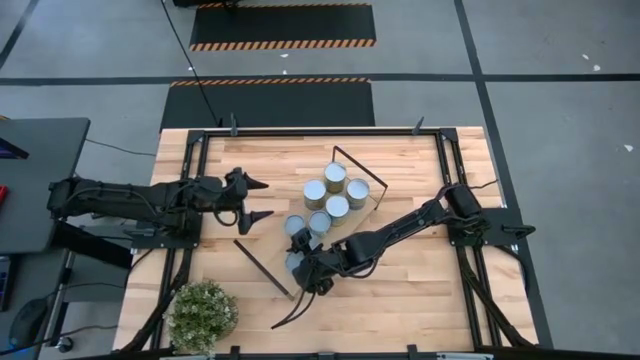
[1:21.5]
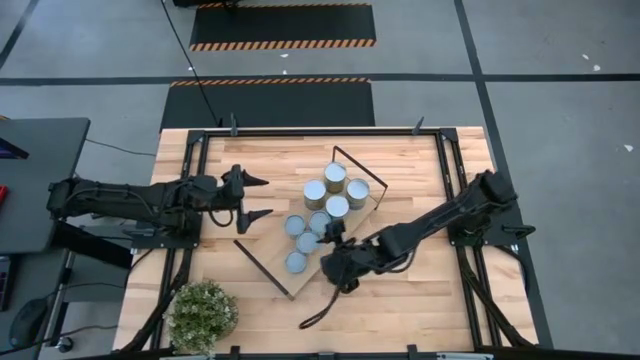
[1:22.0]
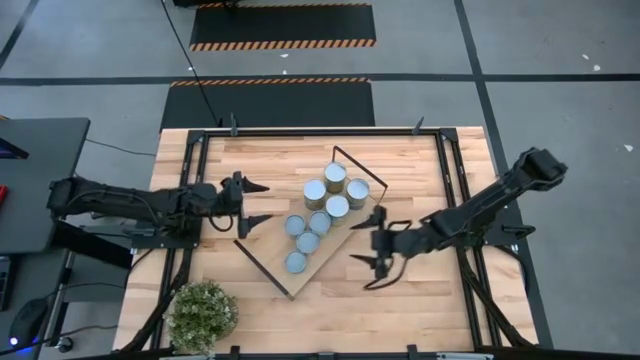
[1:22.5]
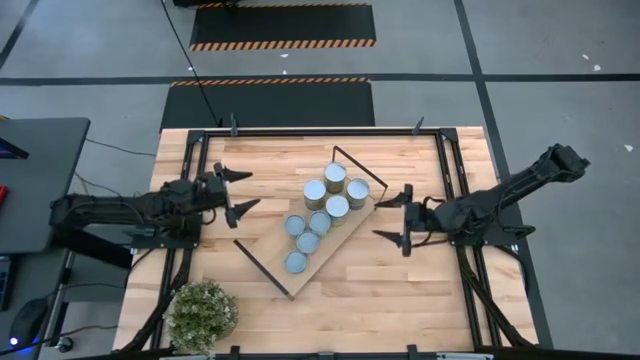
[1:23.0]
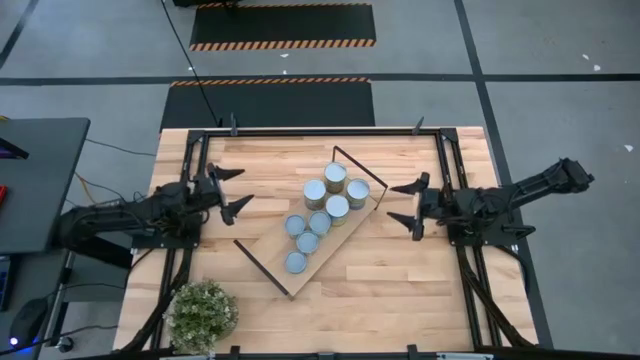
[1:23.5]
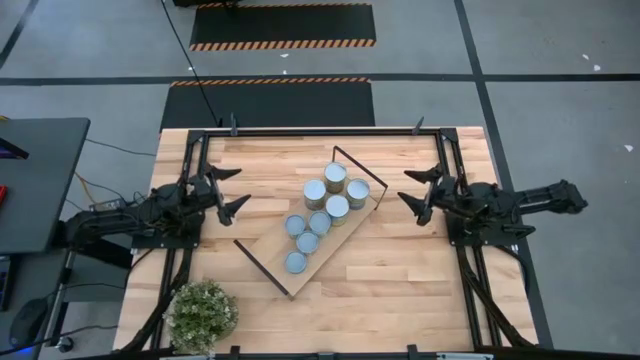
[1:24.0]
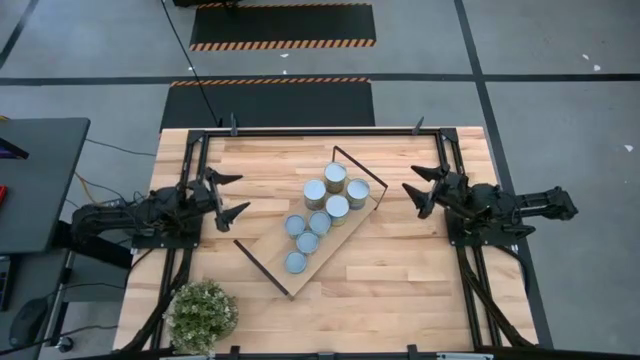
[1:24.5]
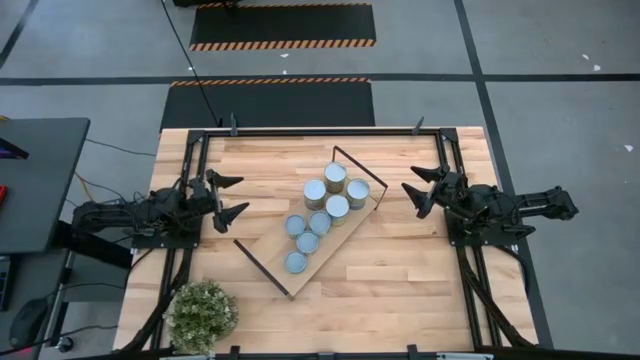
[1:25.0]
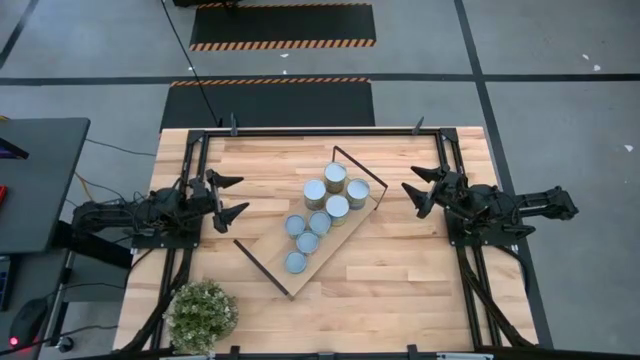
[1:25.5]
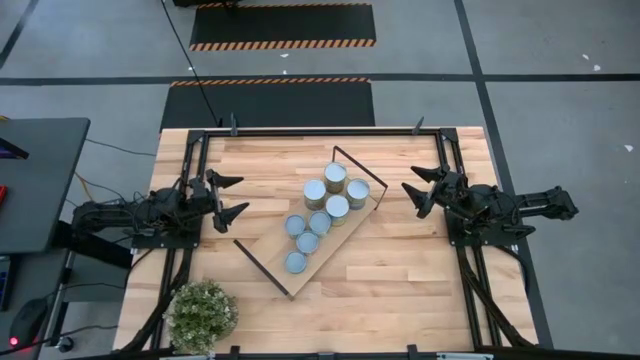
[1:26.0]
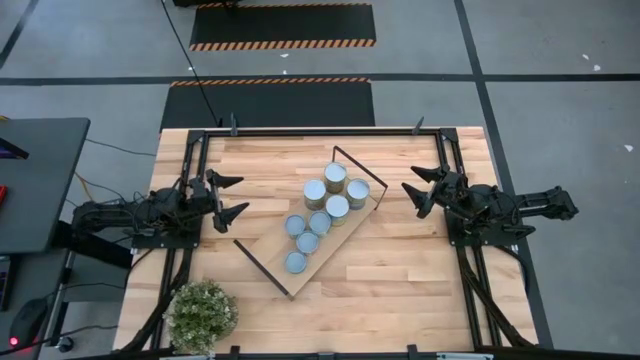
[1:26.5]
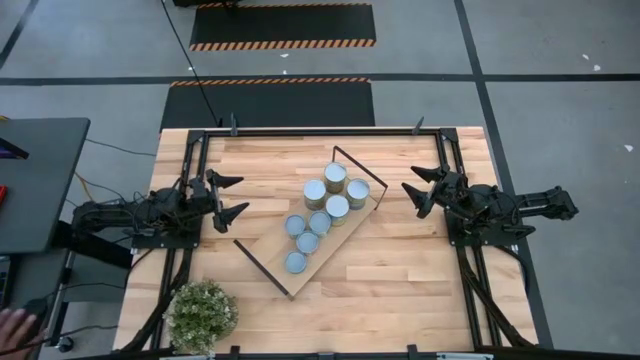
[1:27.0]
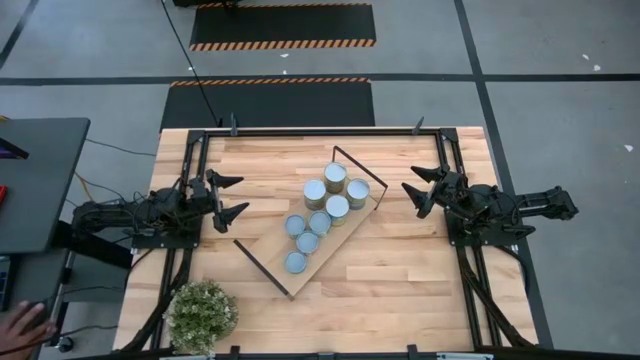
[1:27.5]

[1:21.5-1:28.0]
Task: Pick and place cans onto a shelf
Return to Home Position

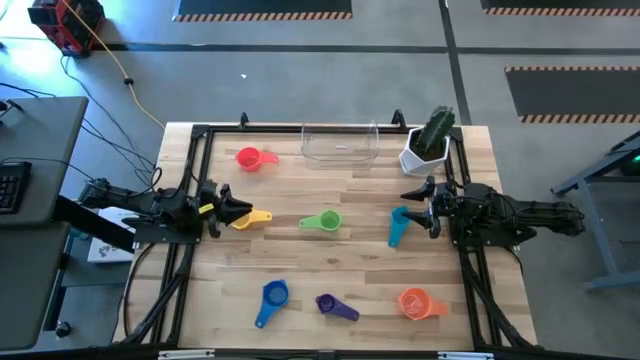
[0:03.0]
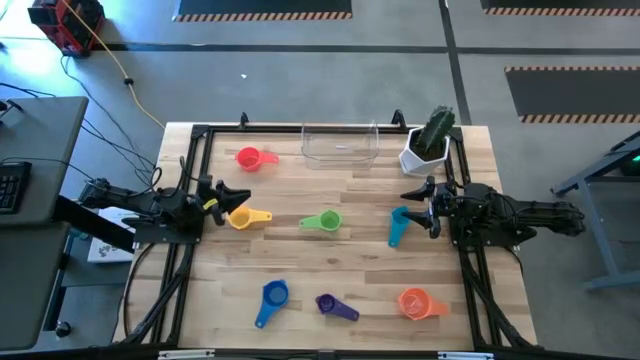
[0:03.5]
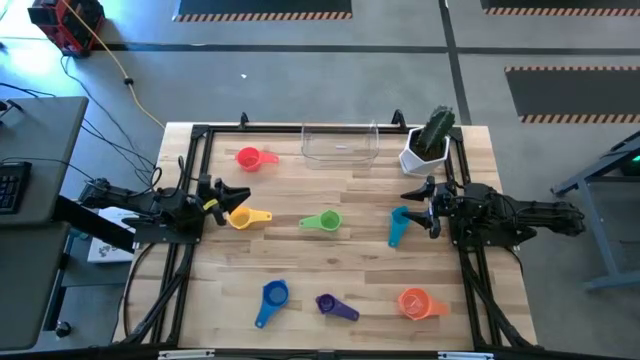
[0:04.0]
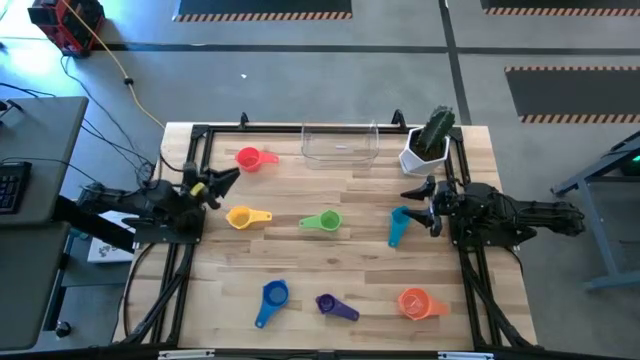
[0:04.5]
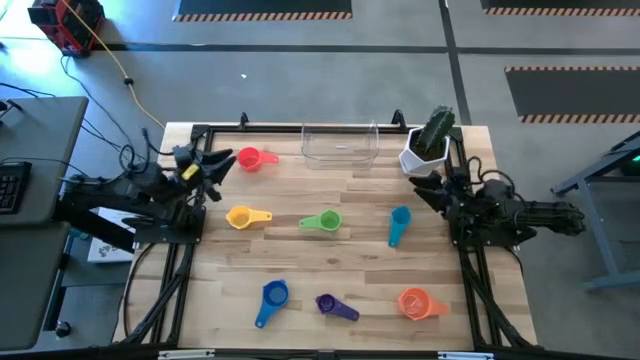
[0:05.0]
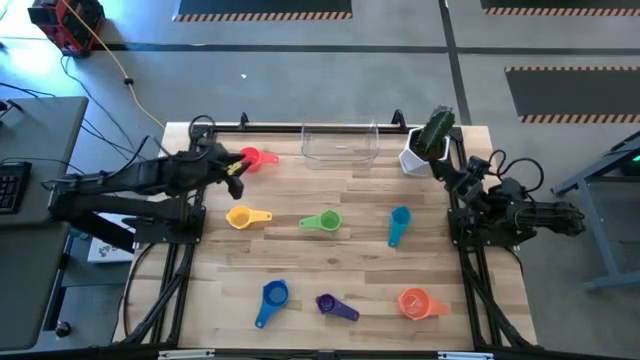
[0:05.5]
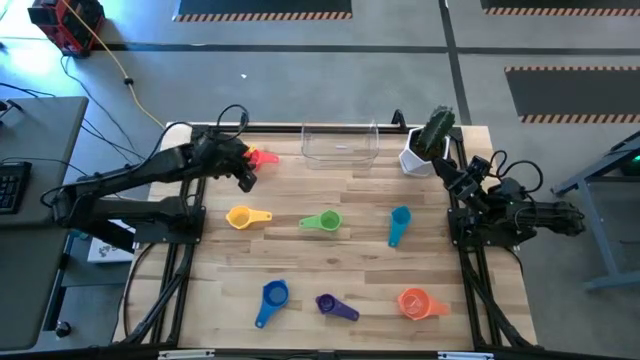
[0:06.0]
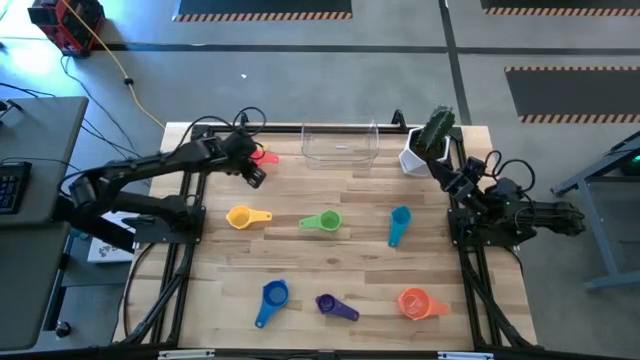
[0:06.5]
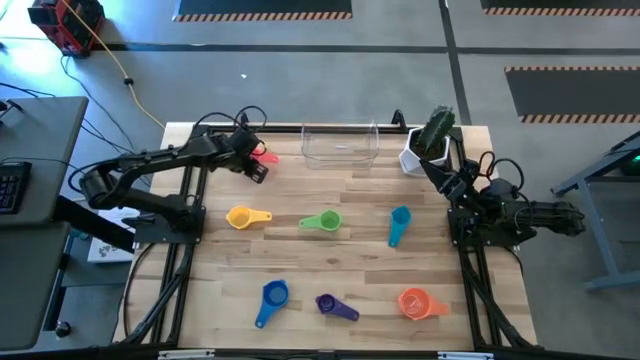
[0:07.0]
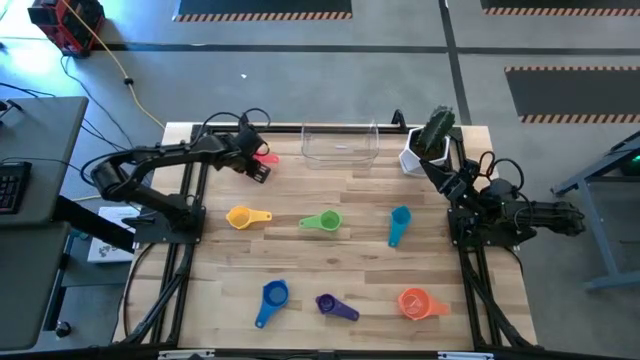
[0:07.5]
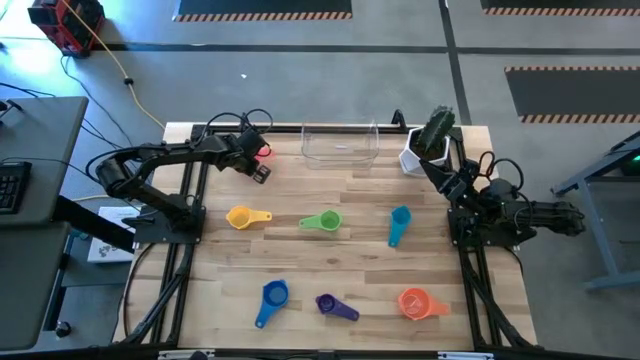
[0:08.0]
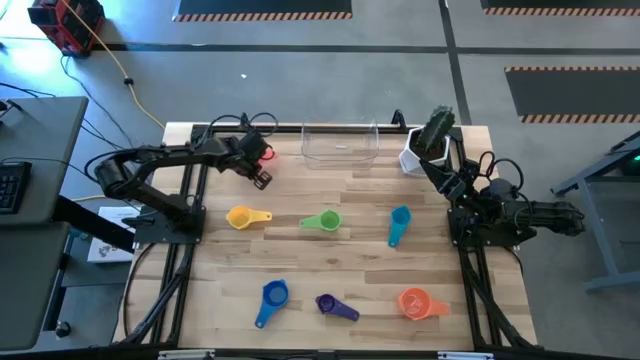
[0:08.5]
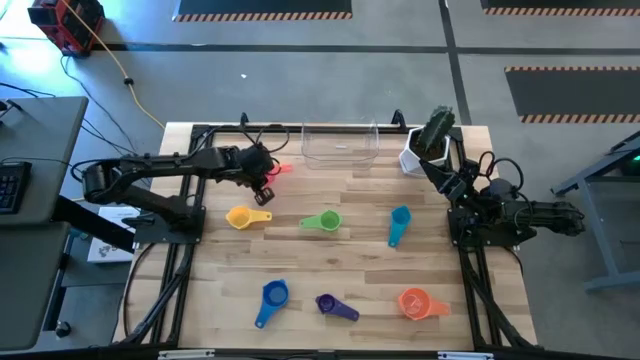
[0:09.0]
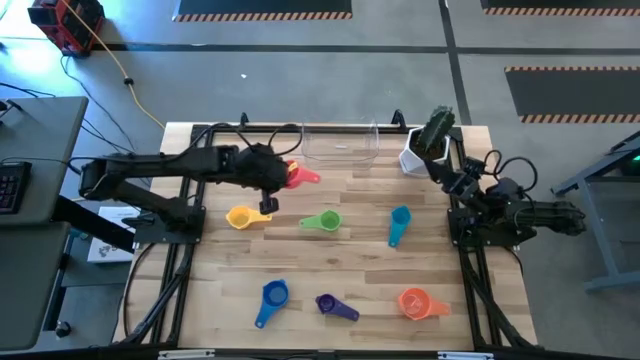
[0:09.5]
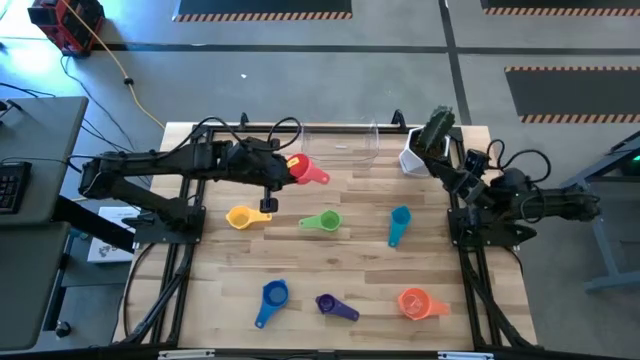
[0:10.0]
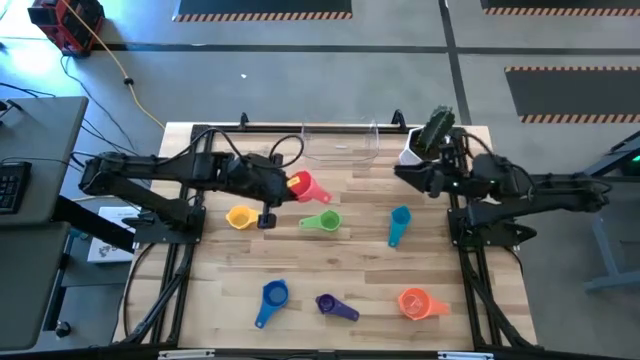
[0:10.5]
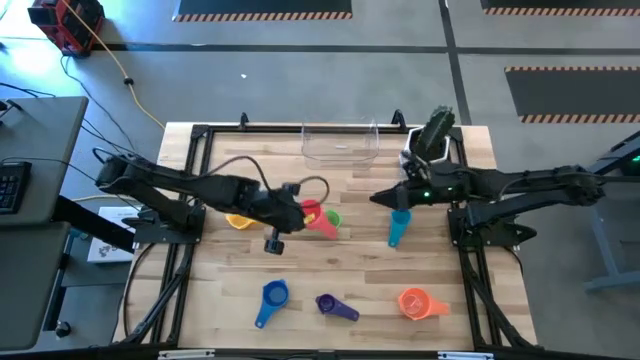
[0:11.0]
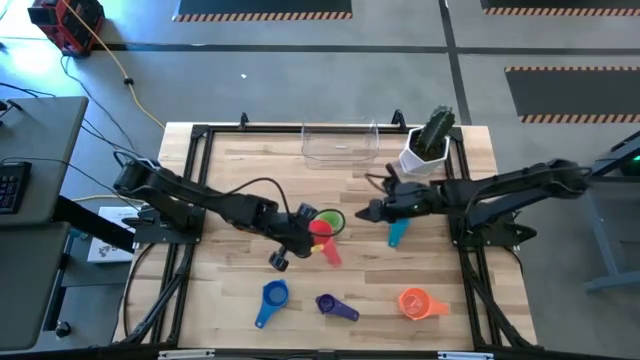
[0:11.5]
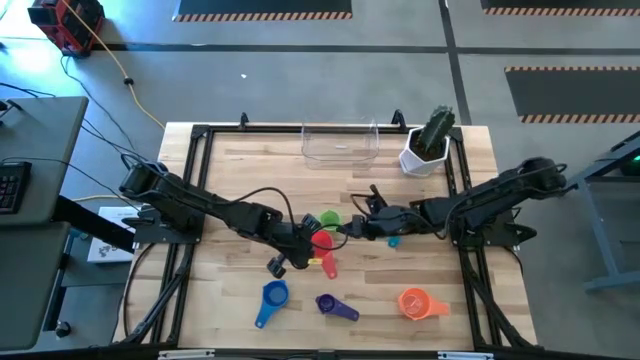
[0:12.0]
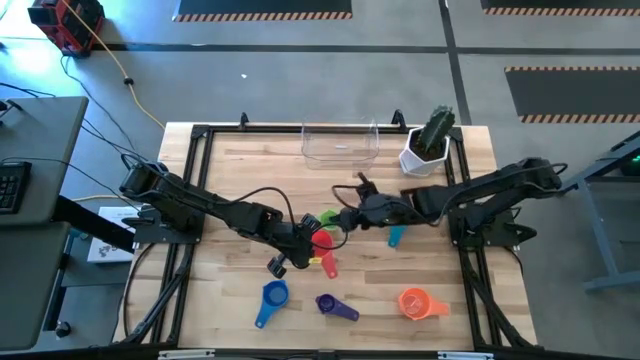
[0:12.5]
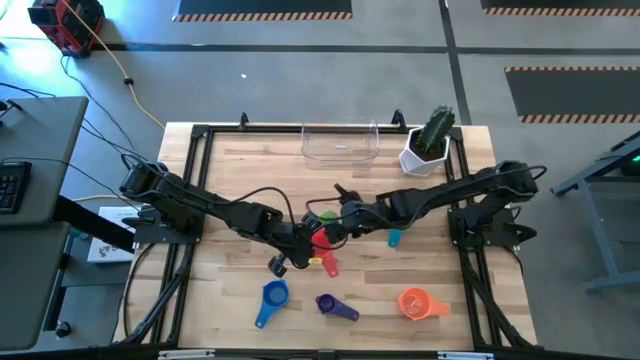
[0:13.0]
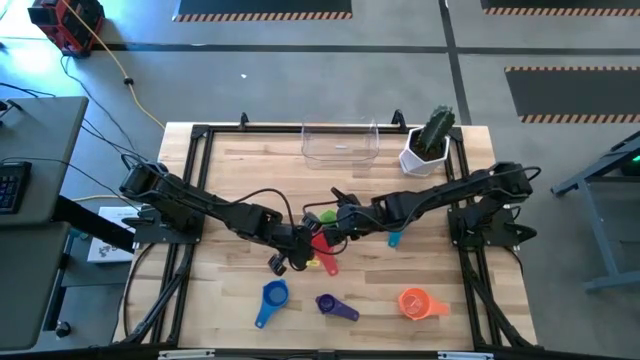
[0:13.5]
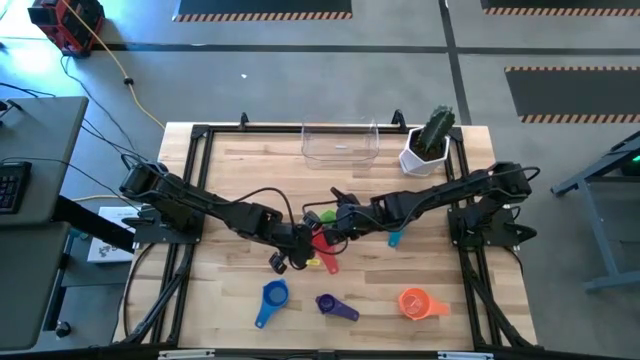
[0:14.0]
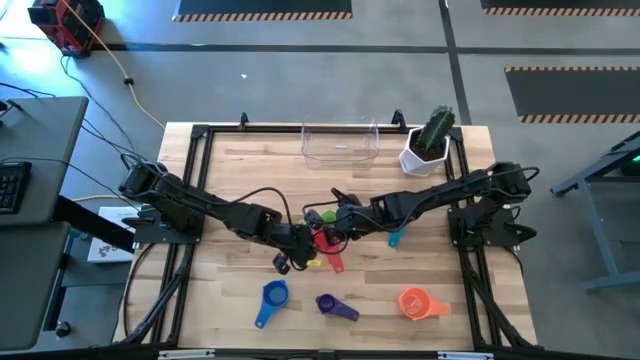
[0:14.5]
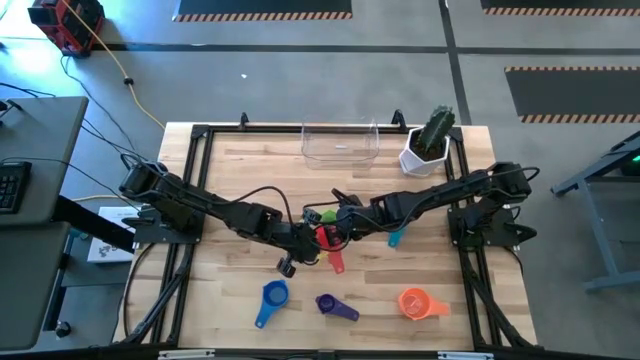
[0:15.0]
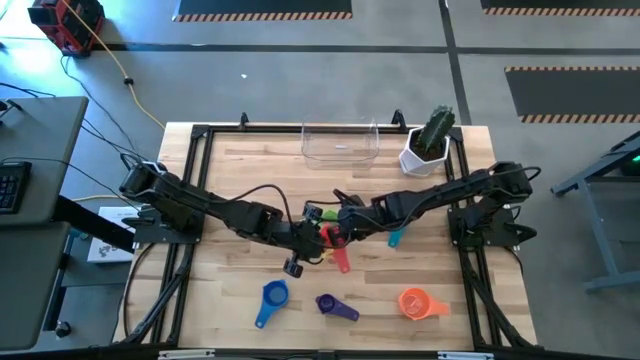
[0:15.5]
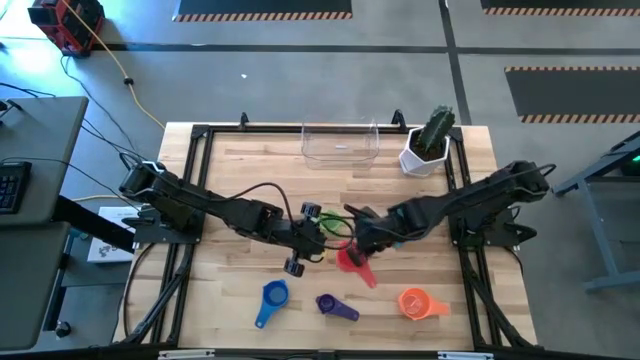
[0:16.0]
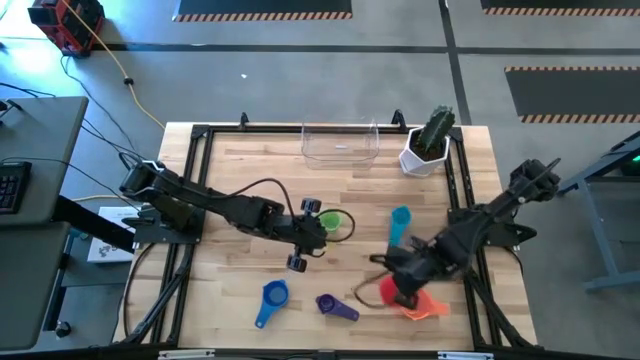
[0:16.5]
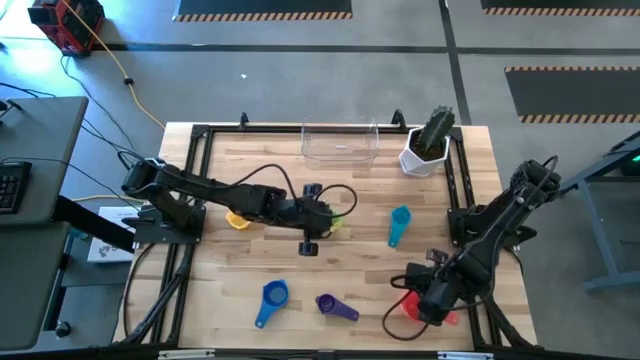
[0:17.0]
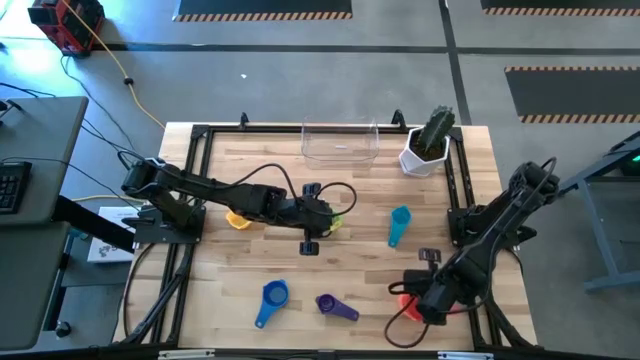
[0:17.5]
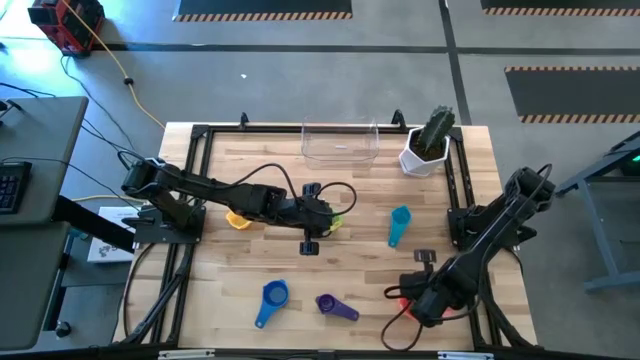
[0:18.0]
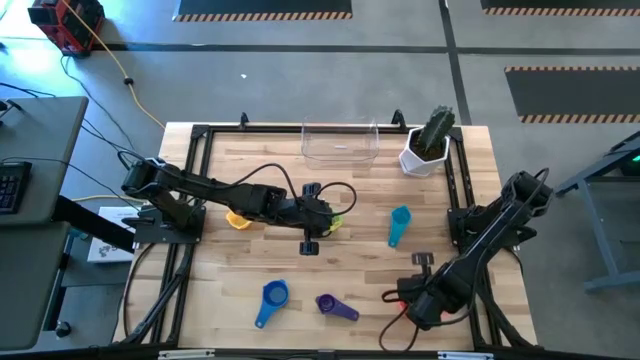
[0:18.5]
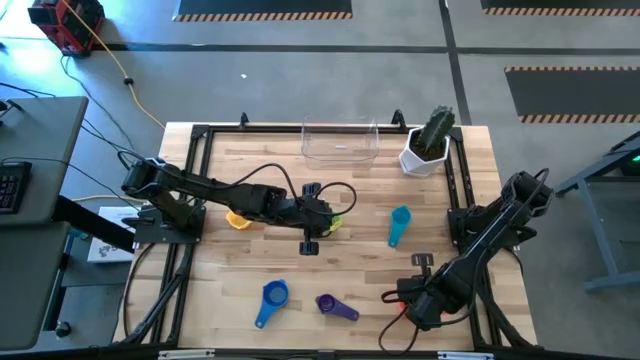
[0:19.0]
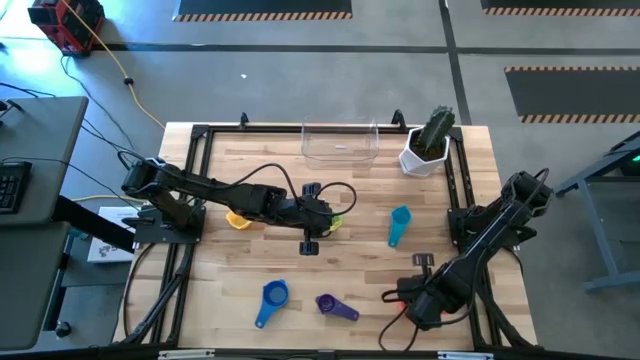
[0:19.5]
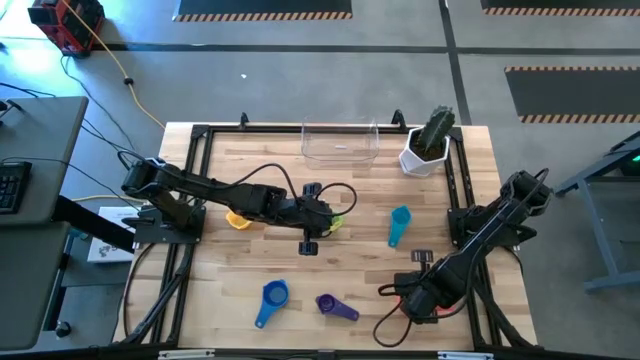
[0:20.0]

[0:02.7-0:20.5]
Task: Nest measuring cups in basket
Stack the red measuring cup on the top of the orange measuring cup
